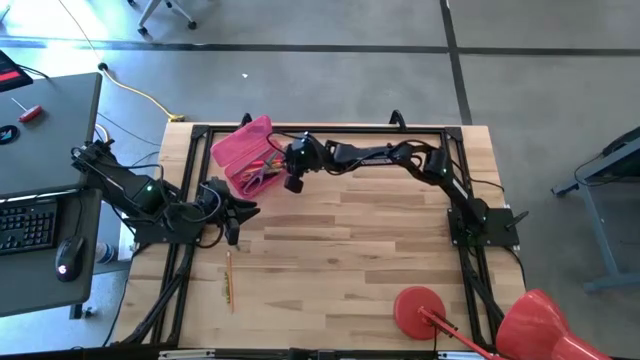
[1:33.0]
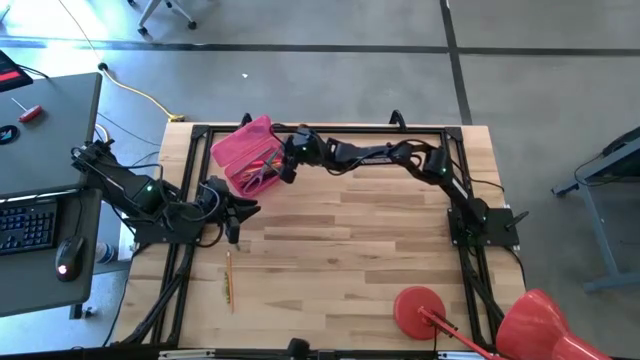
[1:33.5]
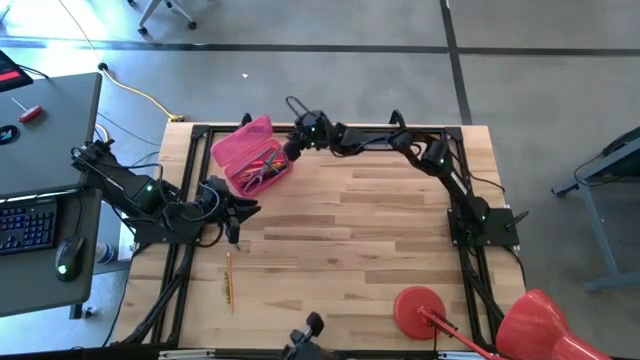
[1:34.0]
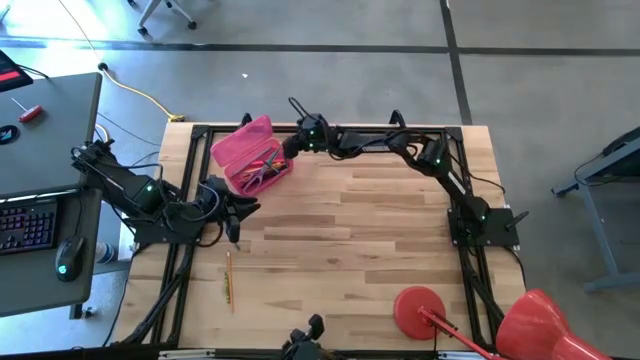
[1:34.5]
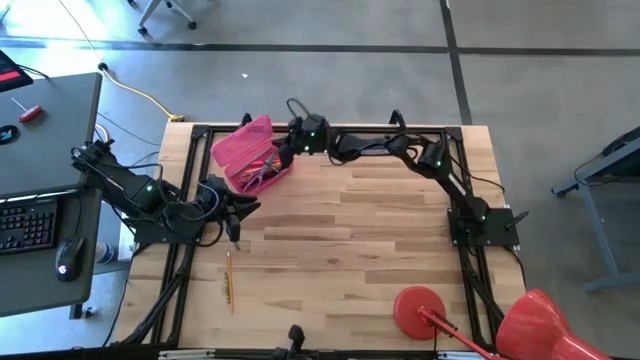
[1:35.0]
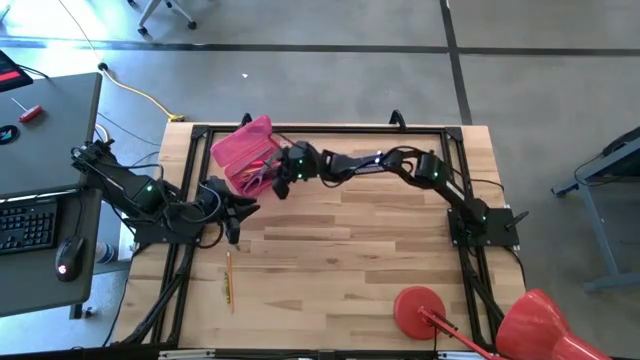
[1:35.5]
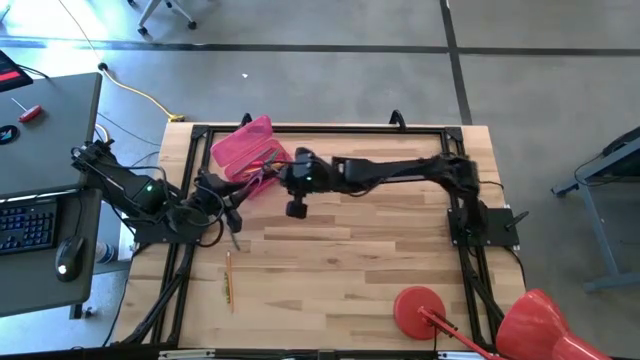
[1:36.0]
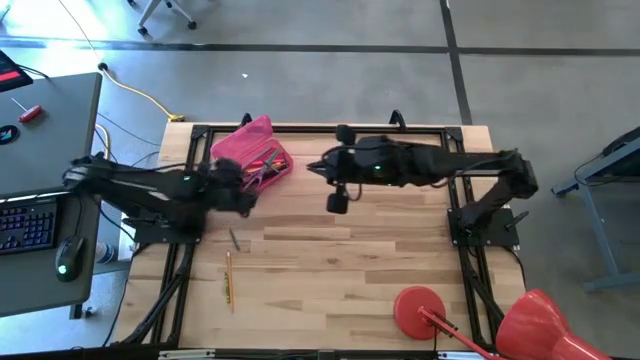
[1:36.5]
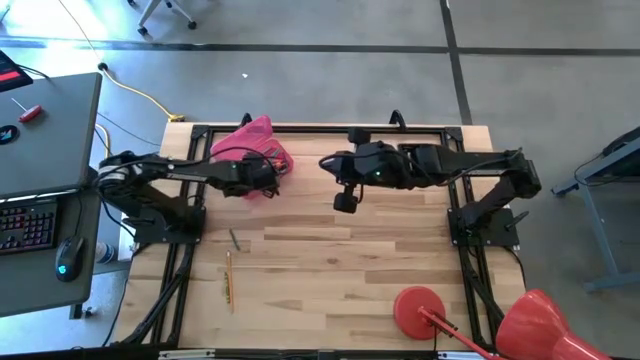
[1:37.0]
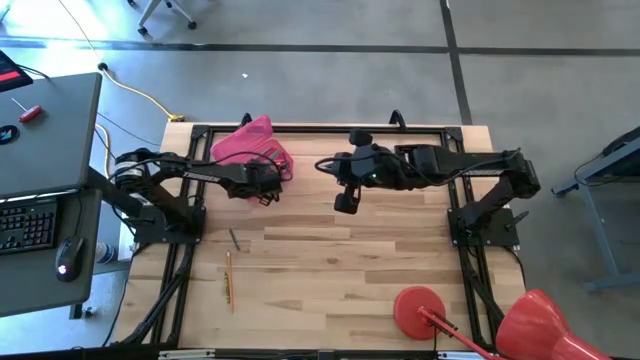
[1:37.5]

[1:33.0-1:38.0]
Task: Pick & place school supplies into a supply box
Adjust the scissors

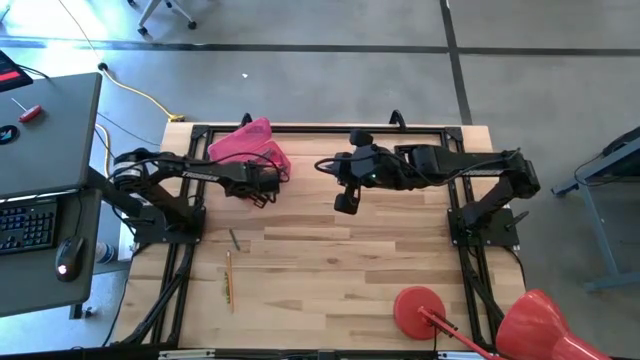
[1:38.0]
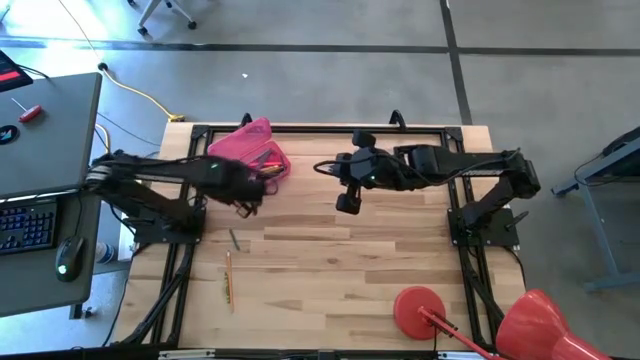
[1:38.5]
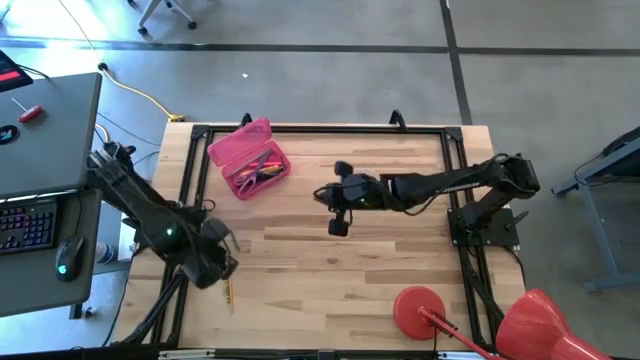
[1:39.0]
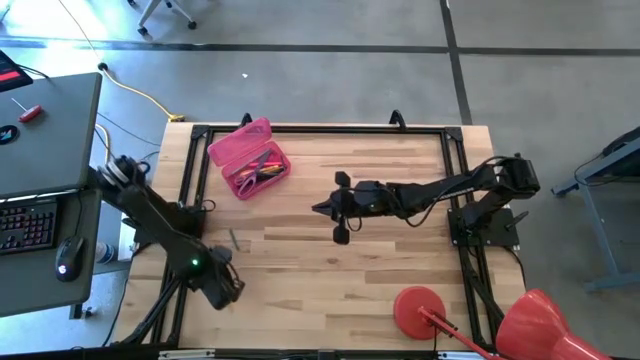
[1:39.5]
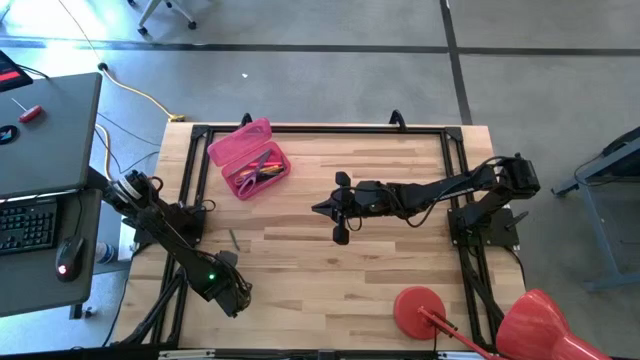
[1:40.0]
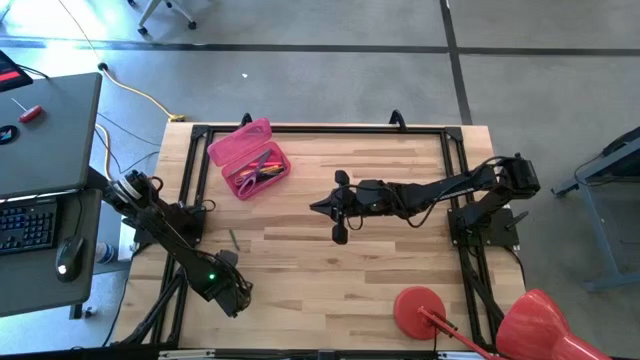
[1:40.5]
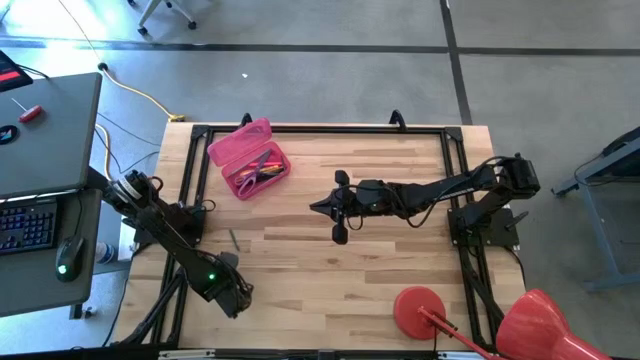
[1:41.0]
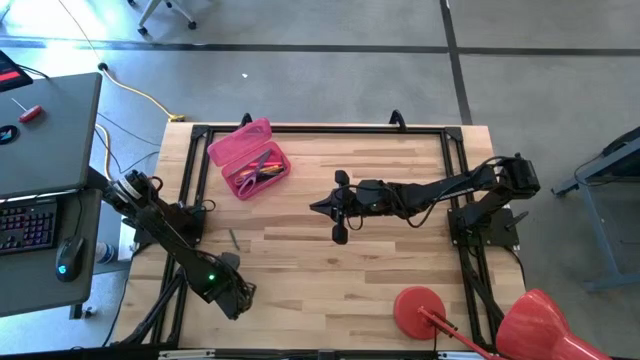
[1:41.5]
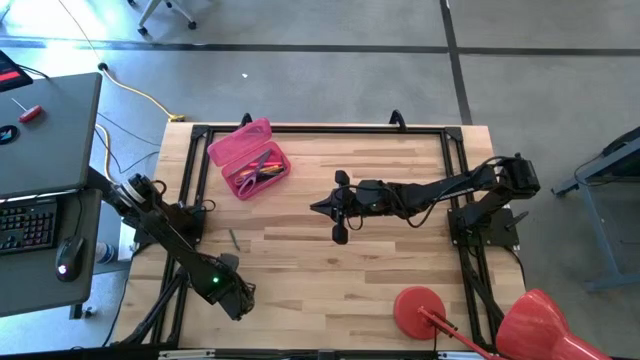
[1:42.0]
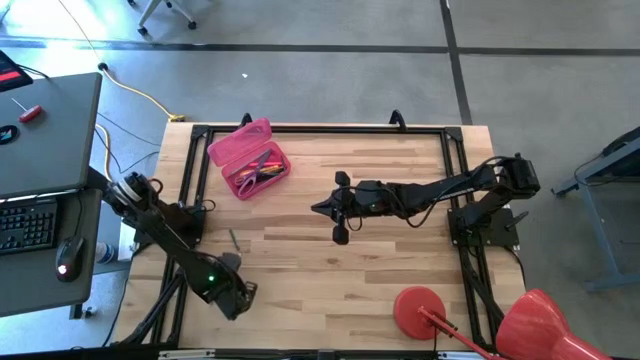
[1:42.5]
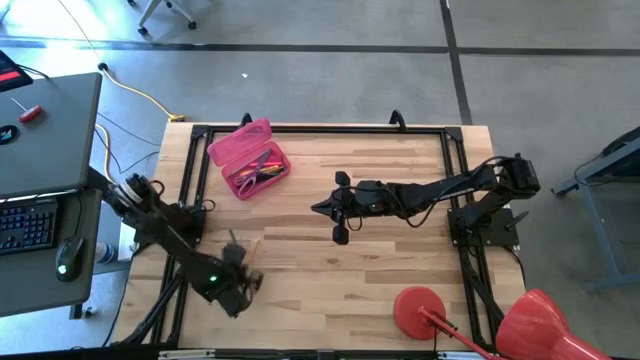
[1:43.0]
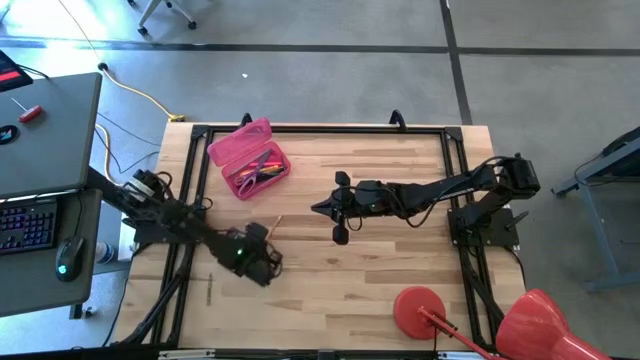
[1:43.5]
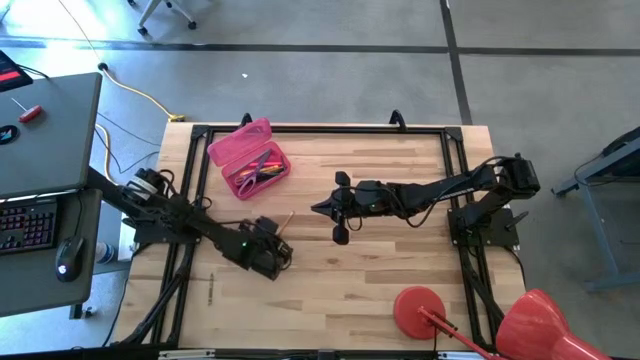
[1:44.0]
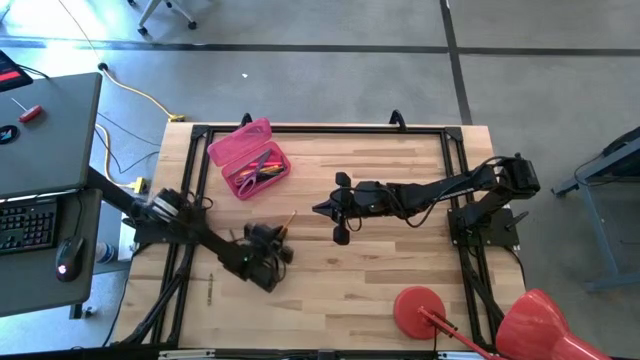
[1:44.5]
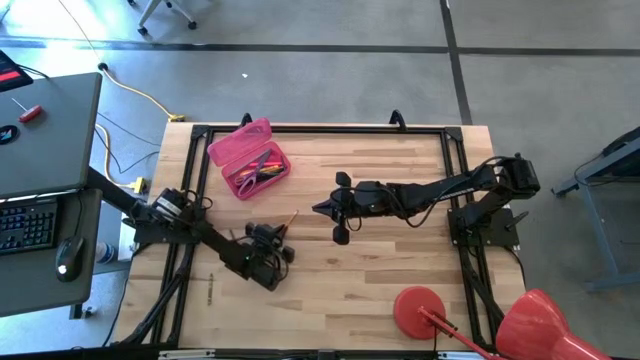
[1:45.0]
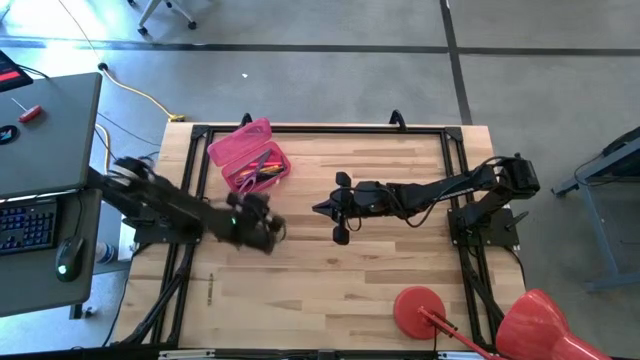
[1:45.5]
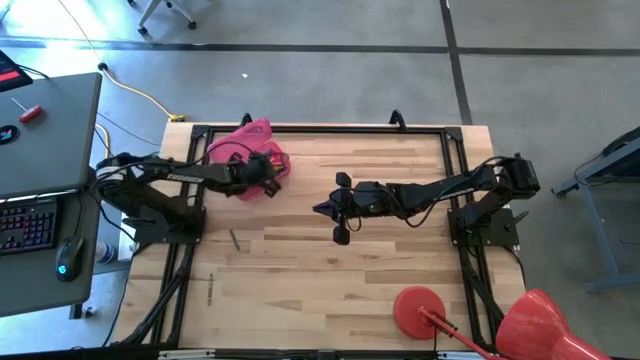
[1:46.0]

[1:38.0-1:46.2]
Put the orange pencil into the supply box

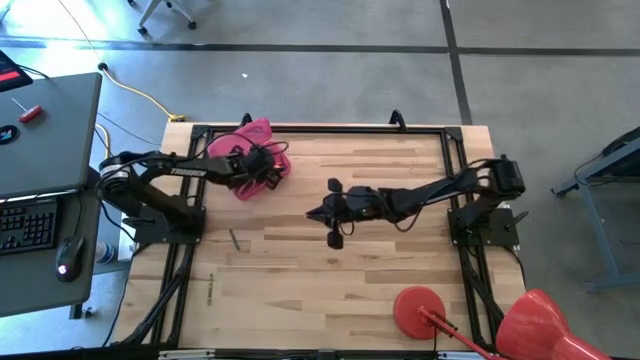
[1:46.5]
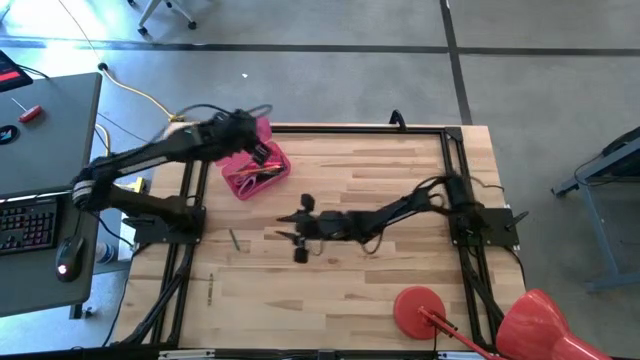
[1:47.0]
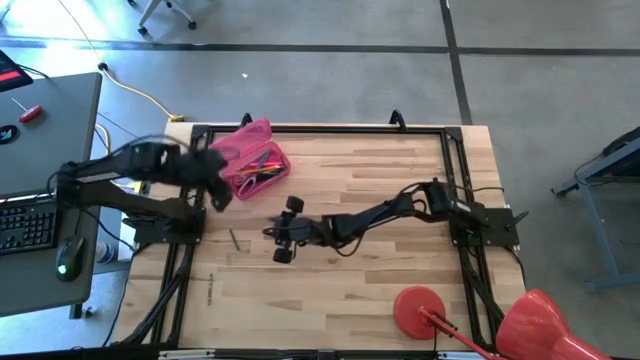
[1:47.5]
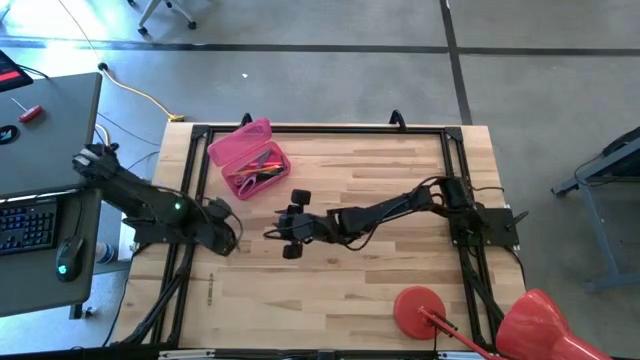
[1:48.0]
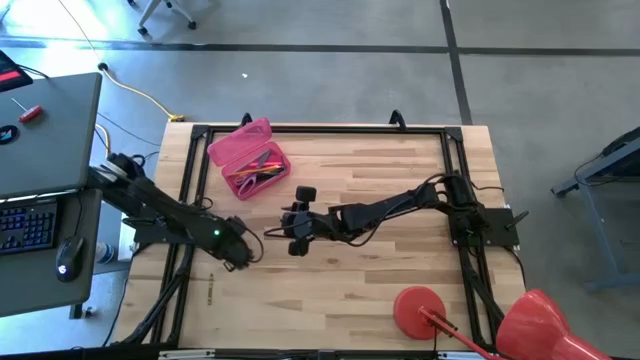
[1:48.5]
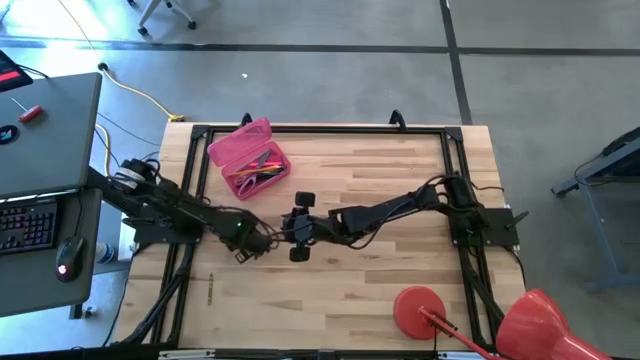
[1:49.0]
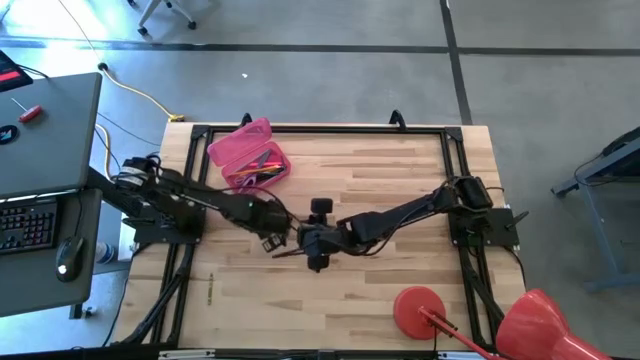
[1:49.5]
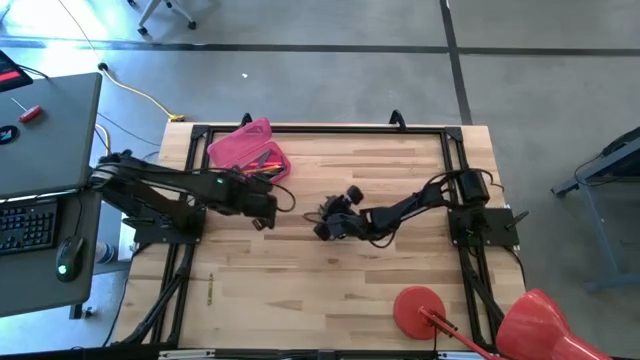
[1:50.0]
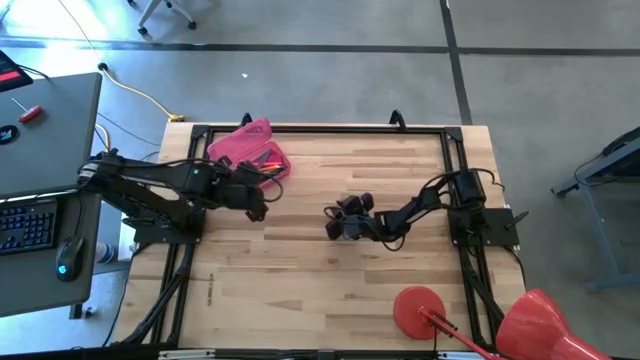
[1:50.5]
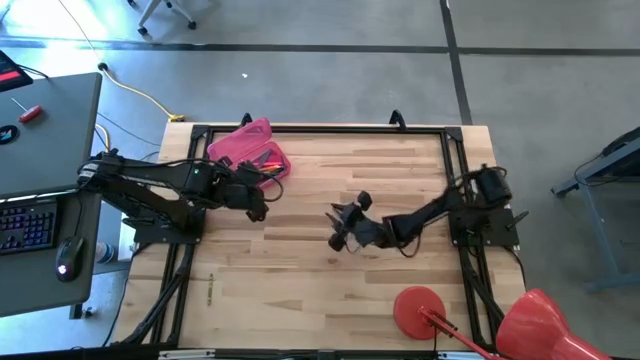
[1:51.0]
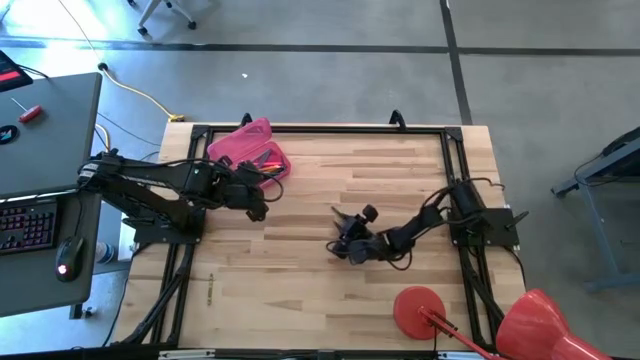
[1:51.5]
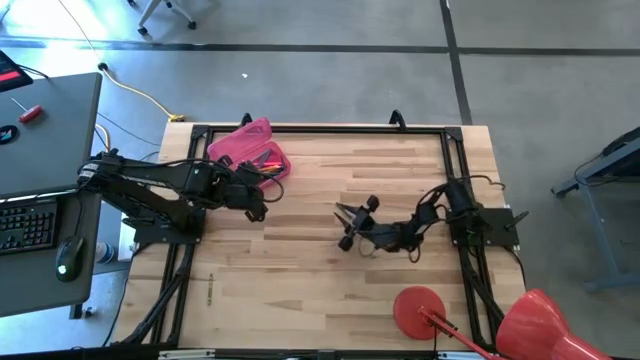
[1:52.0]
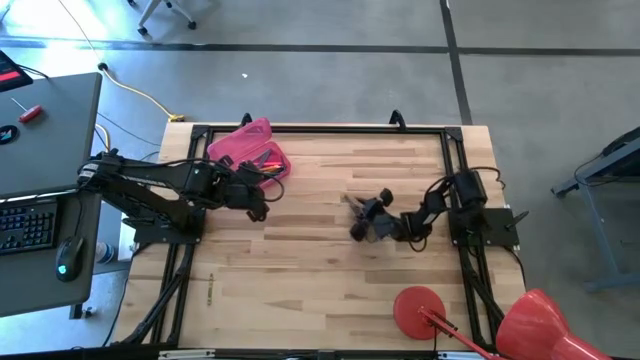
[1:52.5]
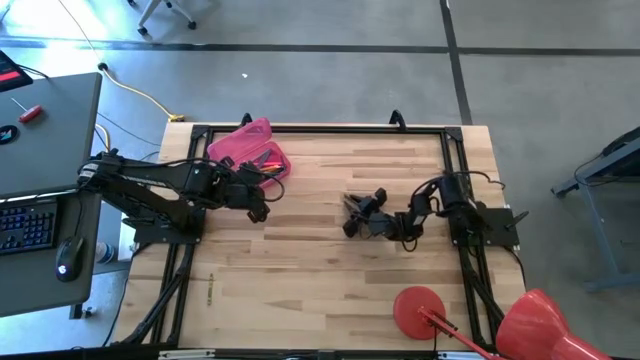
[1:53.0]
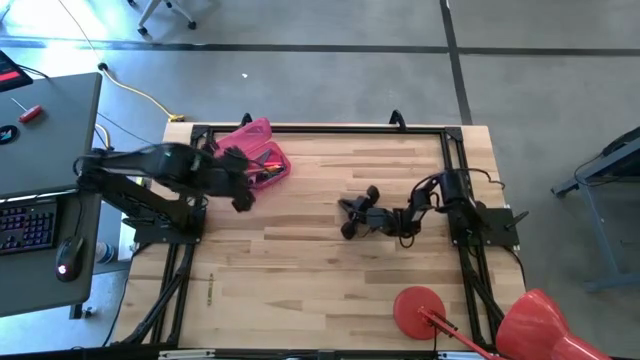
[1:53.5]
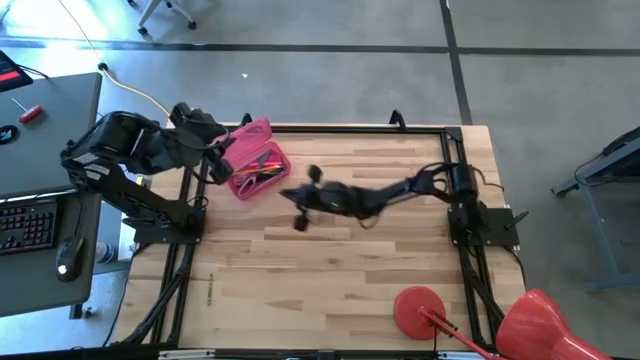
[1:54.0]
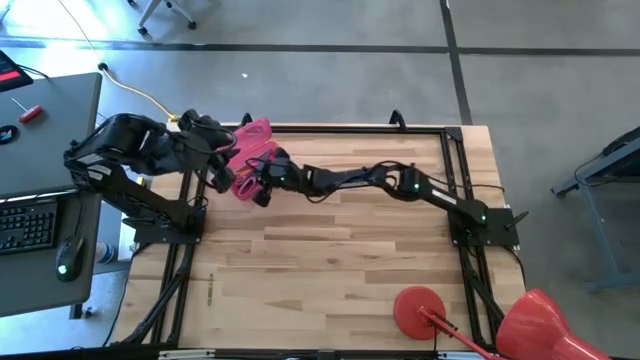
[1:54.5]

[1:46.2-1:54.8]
Put the dark green crayon into the supply box
